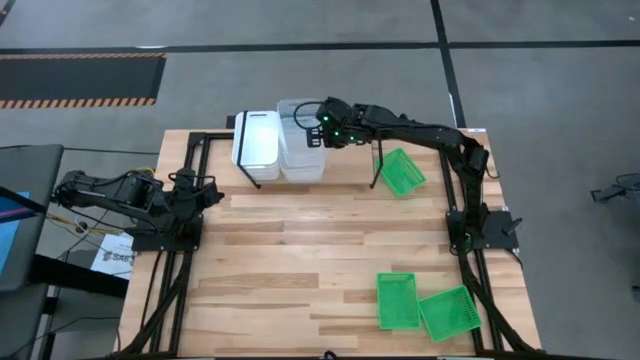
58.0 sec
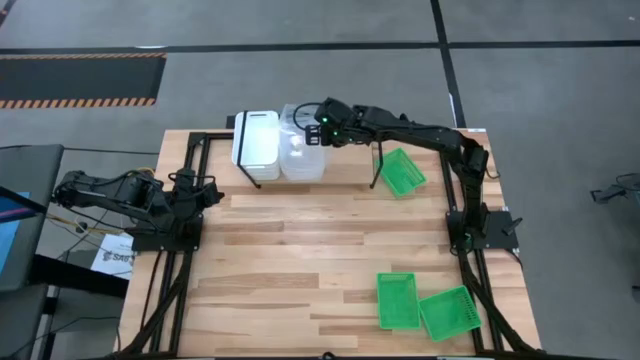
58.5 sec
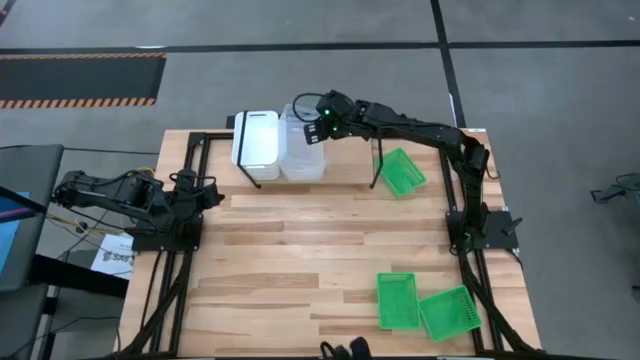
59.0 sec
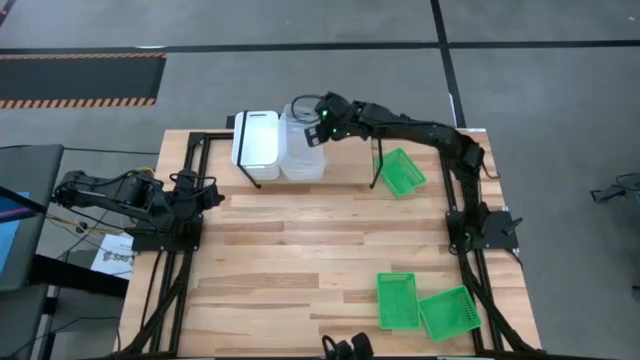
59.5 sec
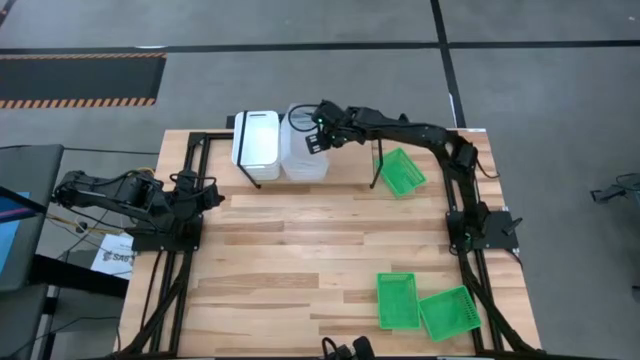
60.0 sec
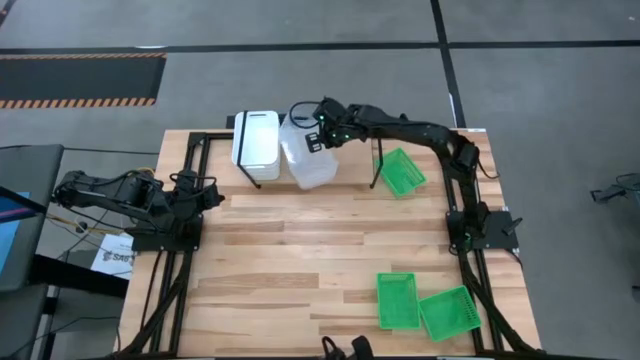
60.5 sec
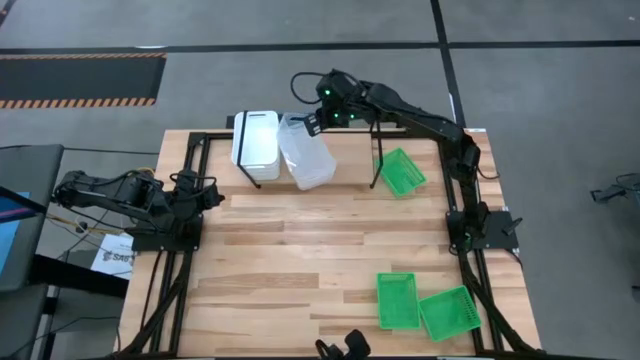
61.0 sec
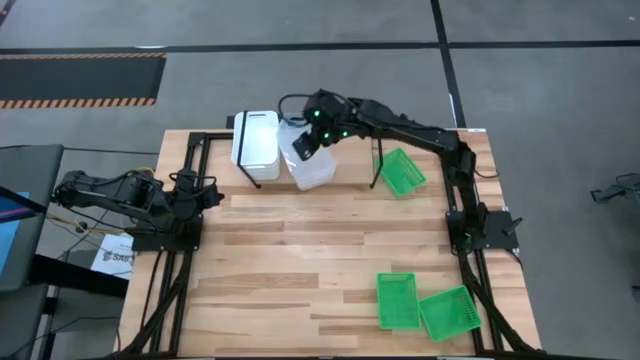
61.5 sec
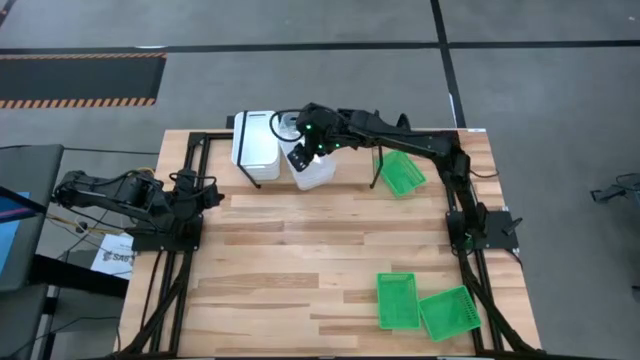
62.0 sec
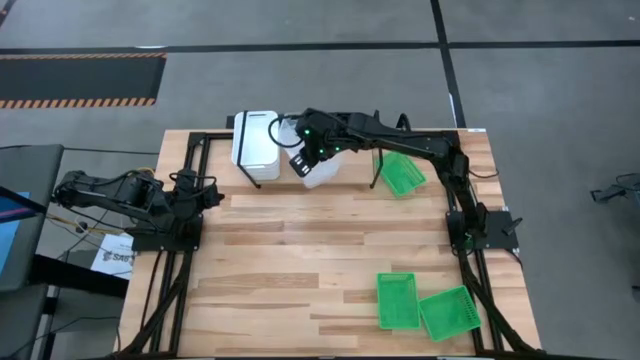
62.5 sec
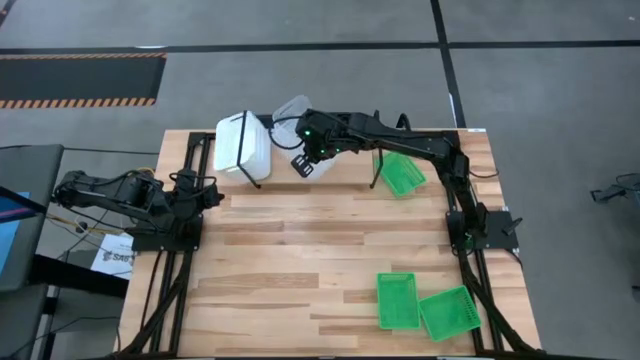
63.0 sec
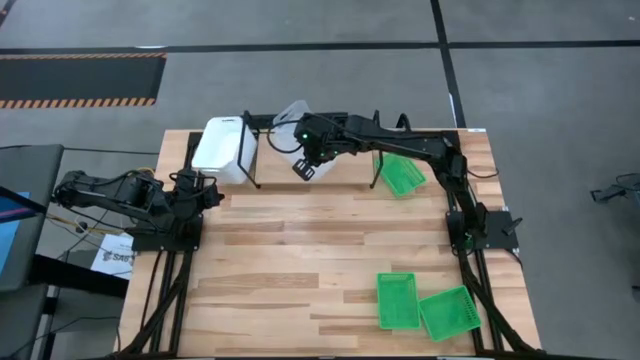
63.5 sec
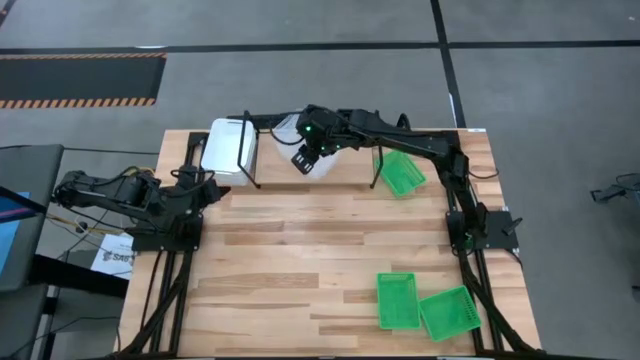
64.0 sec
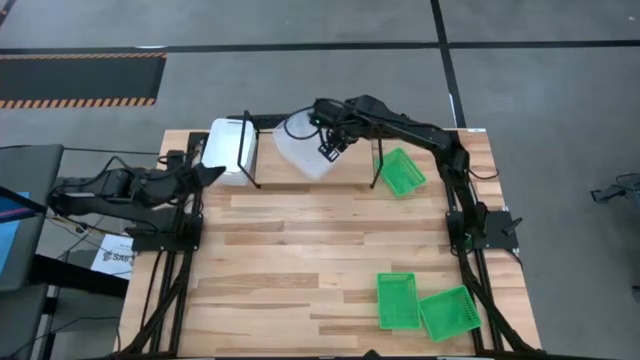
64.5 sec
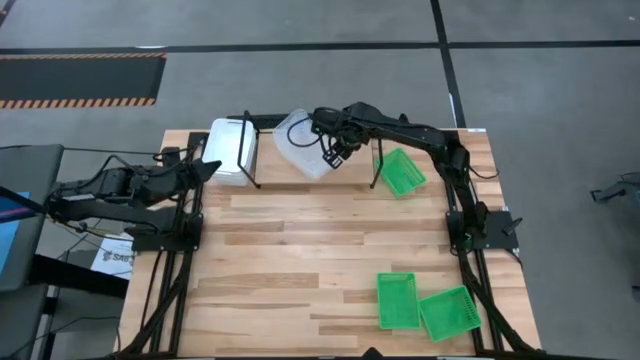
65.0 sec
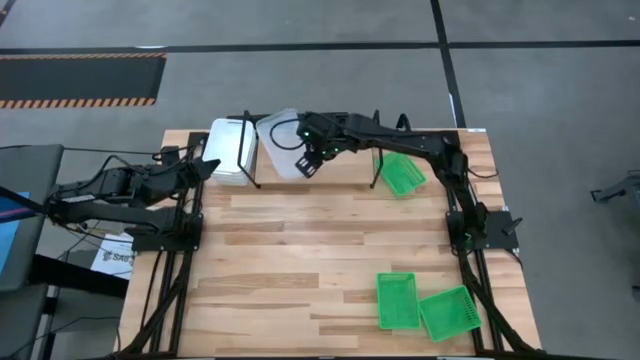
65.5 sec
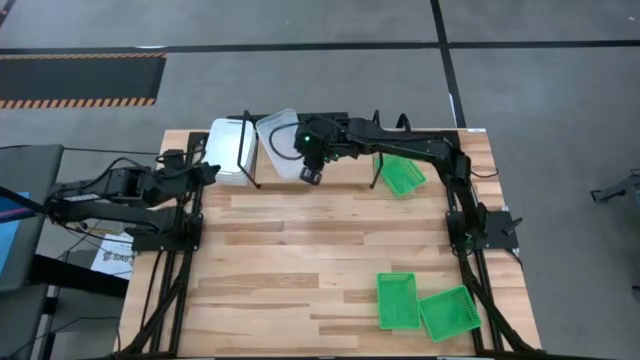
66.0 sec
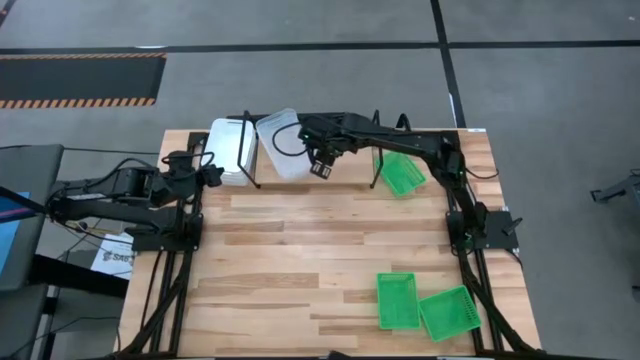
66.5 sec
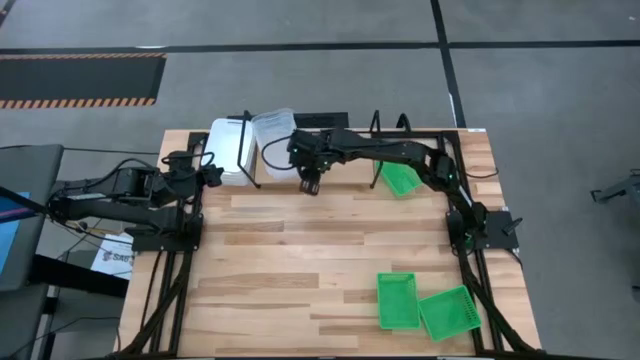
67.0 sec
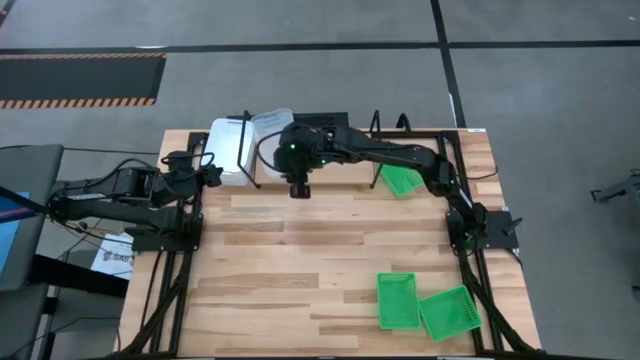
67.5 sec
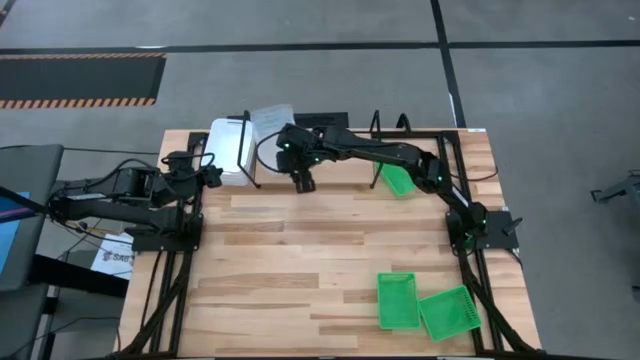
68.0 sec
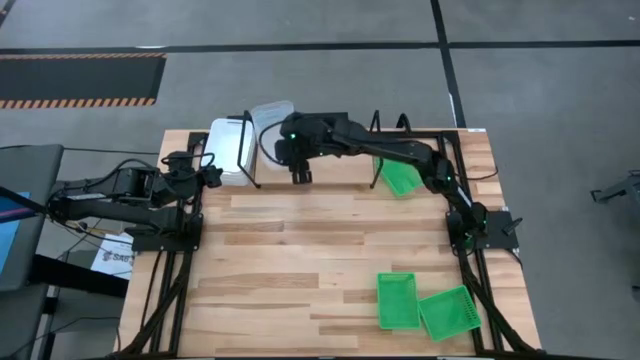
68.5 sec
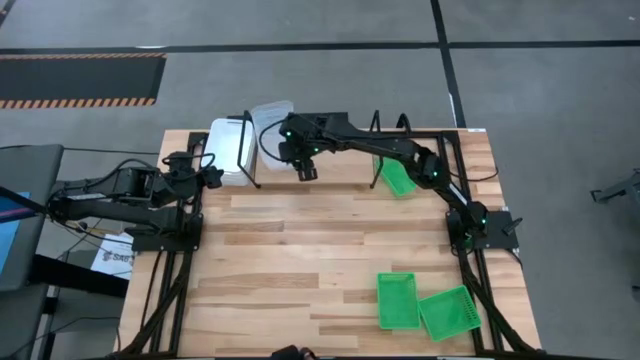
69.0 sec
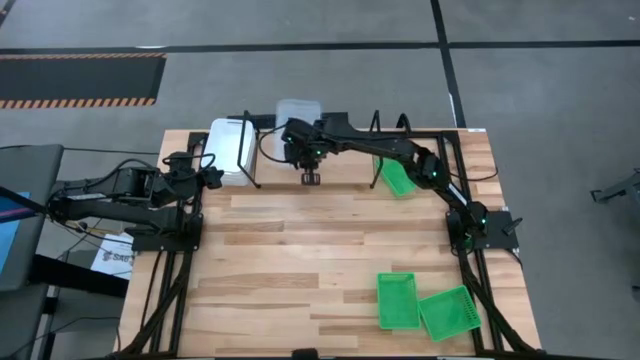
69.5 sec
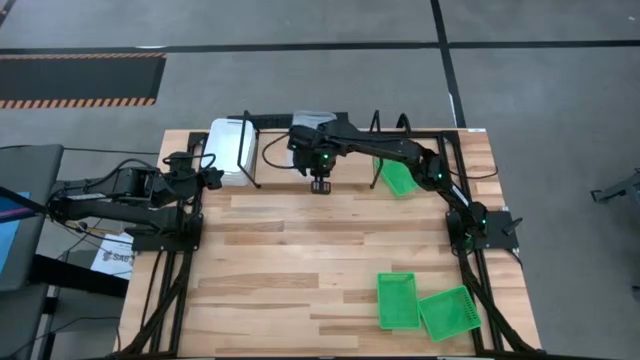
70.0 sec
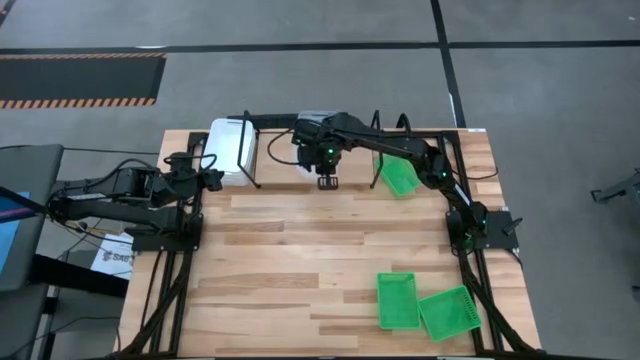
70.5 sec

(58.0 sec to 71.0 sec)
Task: Stack baskets on shelf by color
Stack the transparent bin on top of the transparent bins on the shelf

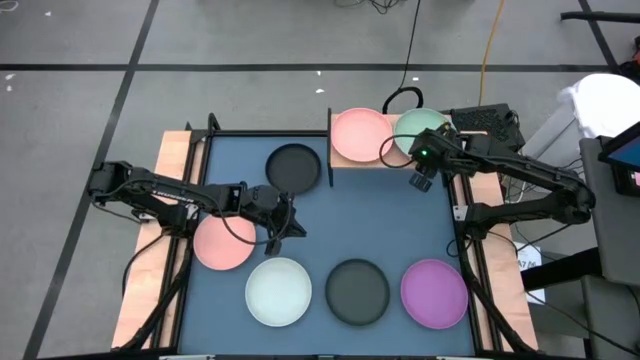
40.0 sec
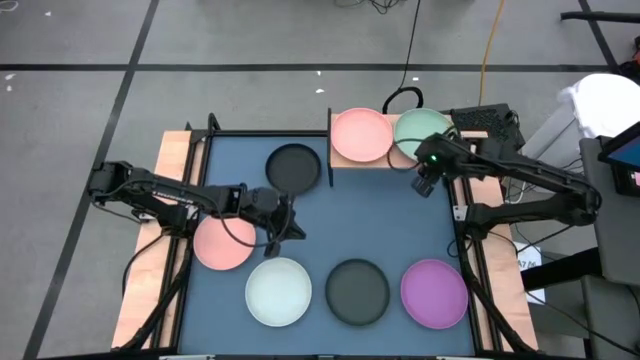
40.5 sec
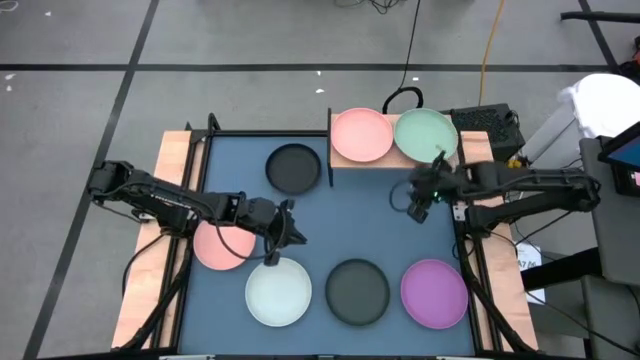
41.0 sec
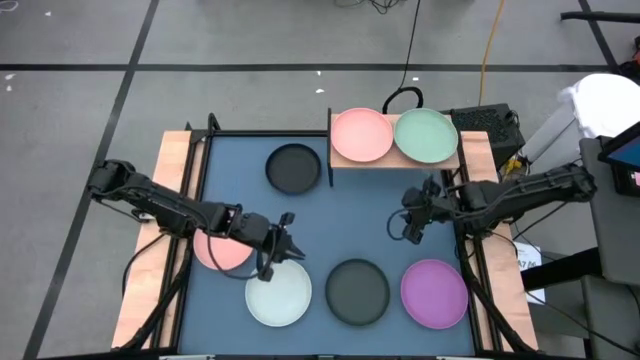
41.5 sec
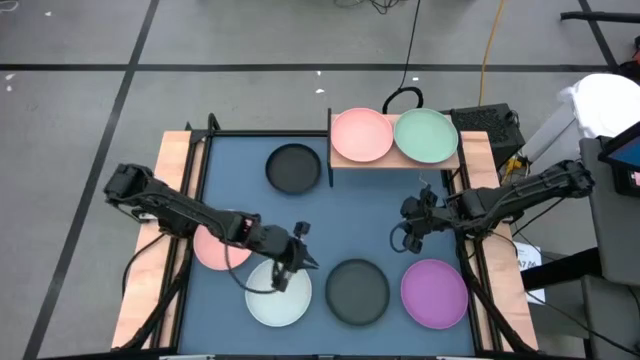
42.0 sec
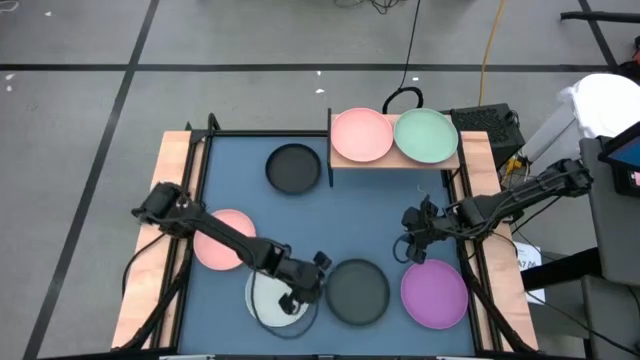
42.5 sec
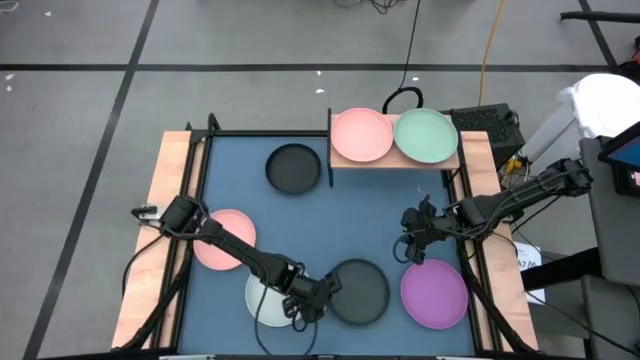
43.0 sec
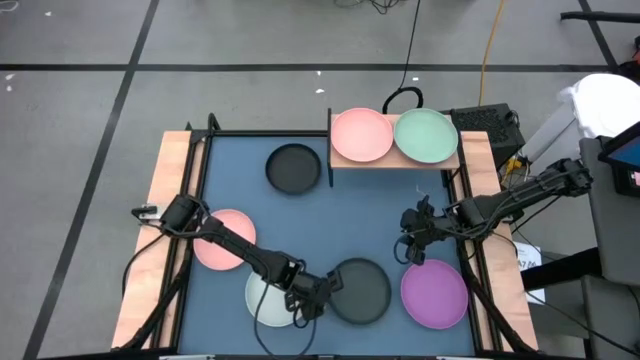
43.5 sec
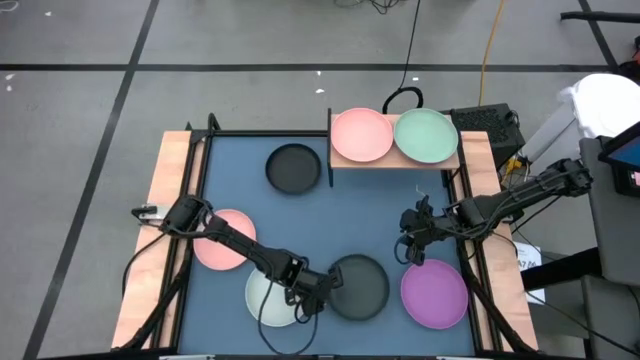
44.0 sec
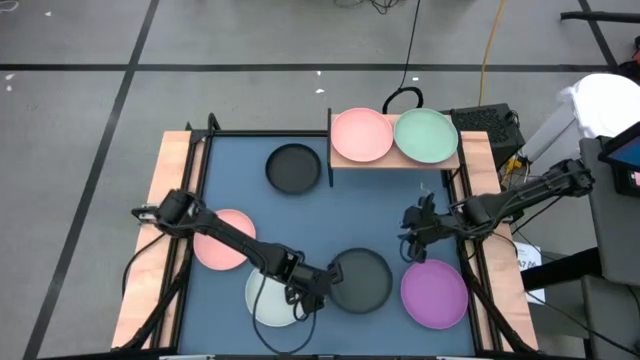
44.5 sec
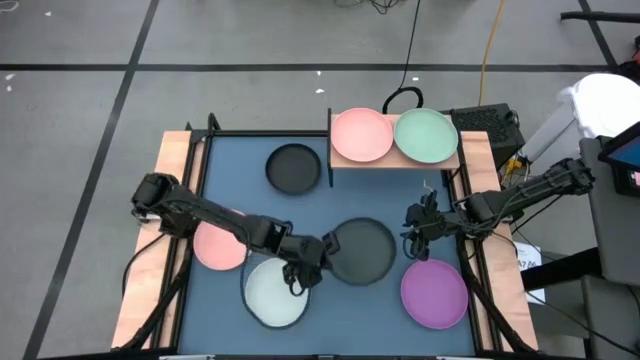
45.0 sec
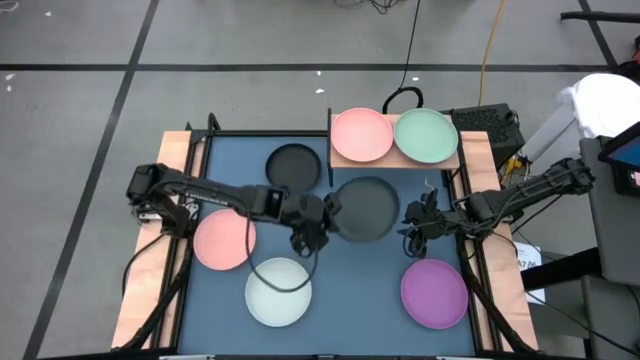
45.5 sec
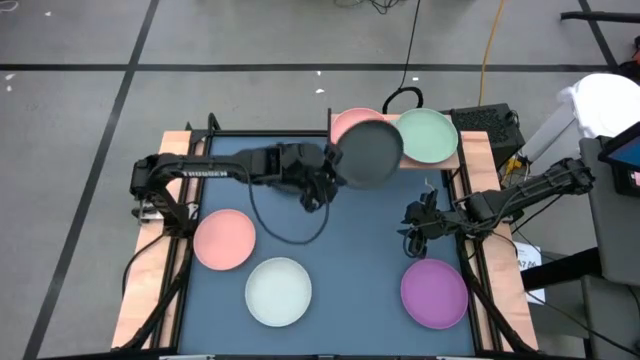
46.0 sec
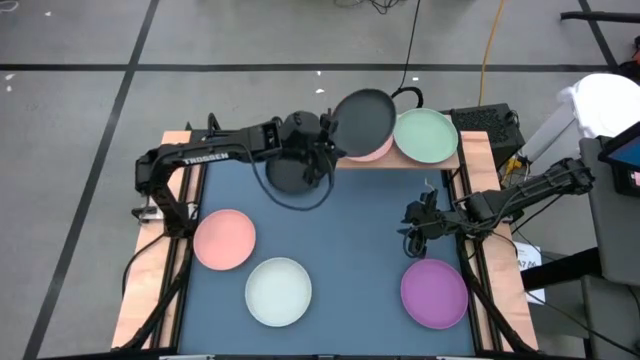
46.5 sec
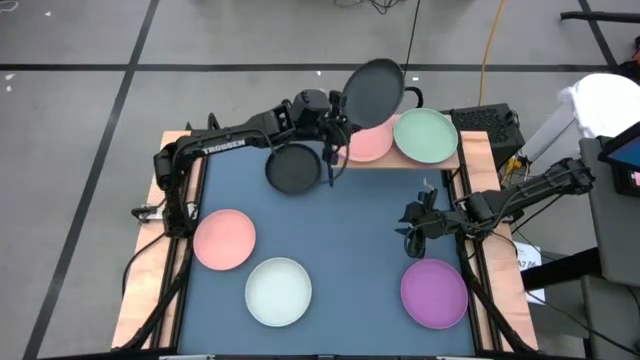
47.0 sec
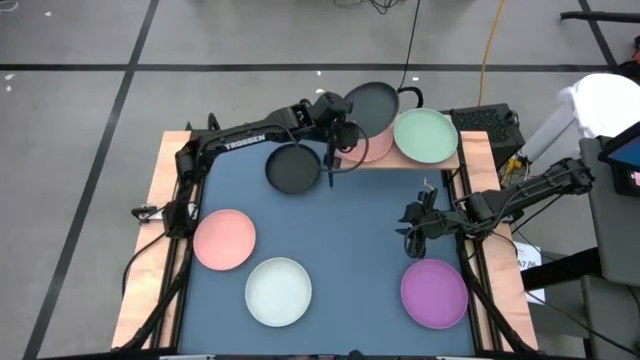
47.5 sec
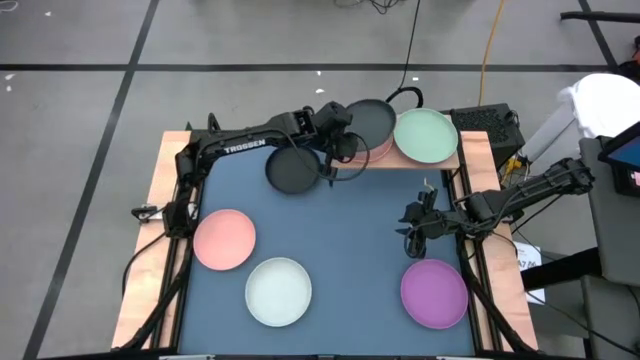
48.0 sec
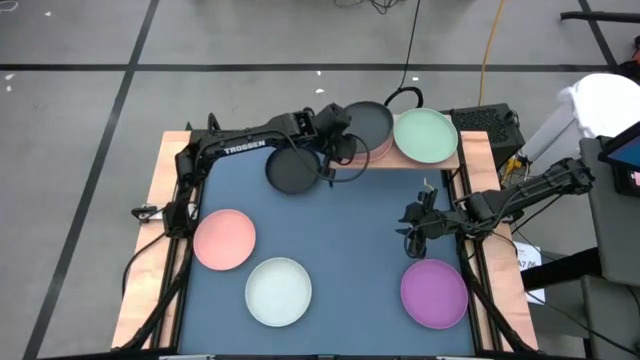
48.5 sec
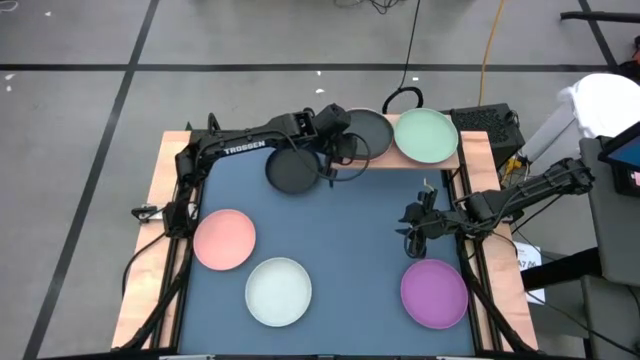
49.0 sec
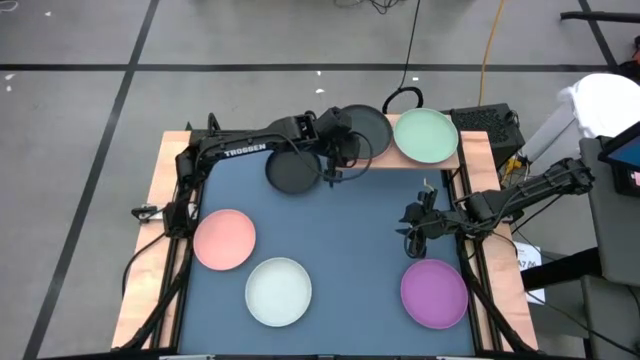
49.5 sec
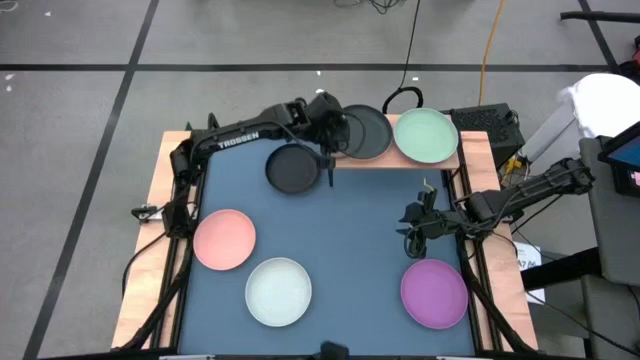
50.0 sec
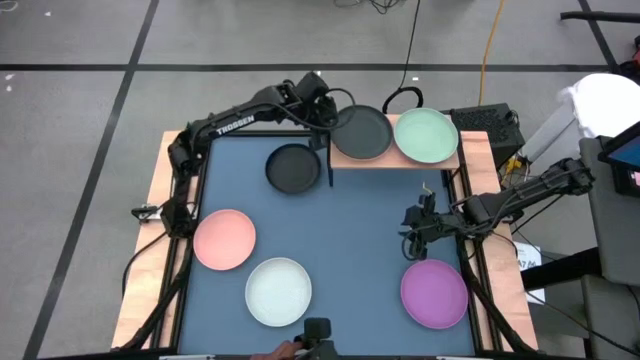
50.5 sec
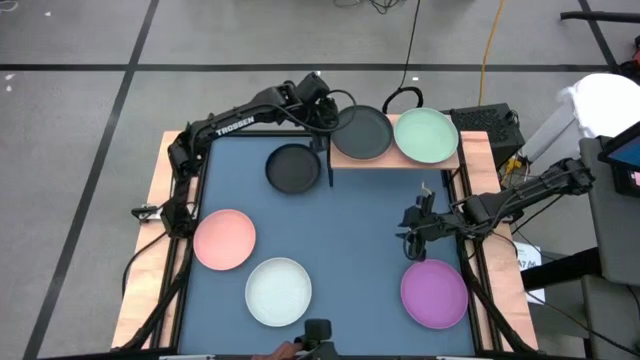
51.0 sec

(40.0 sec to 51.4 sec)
Task: Place and stack plates onto a shelf
Stack the bottom black plate on top of the pink plate on the shelf
